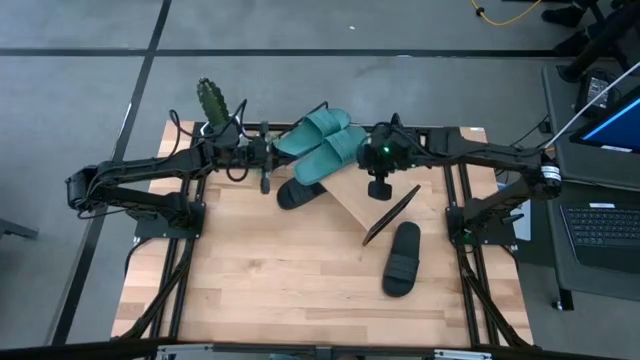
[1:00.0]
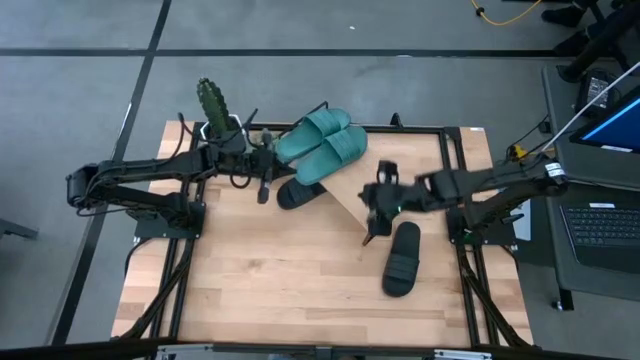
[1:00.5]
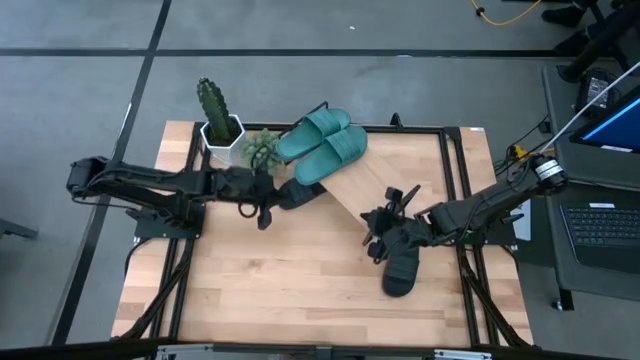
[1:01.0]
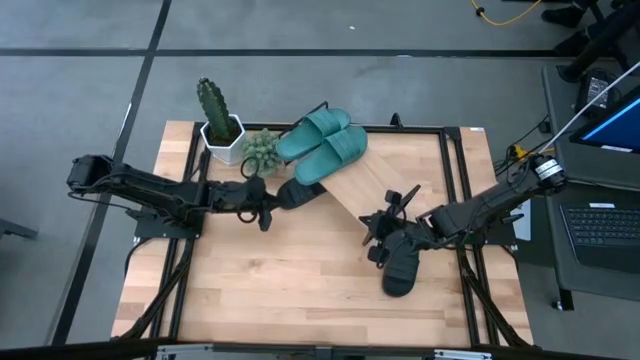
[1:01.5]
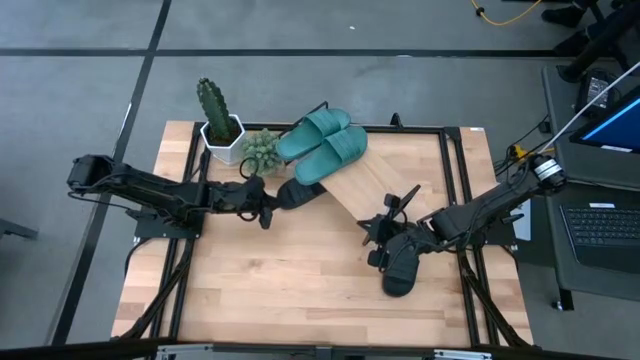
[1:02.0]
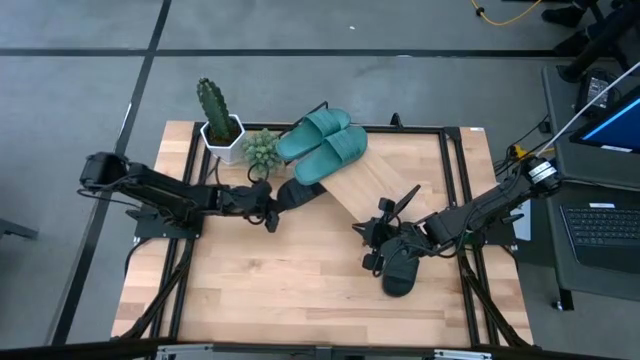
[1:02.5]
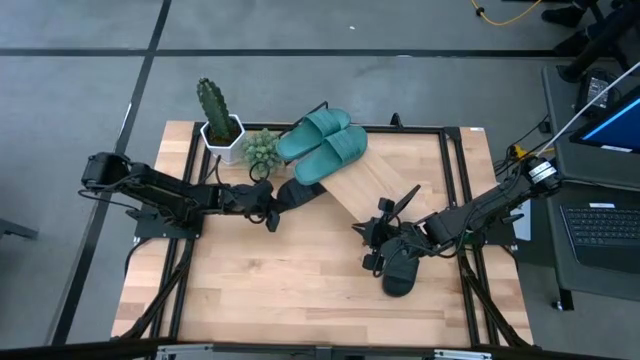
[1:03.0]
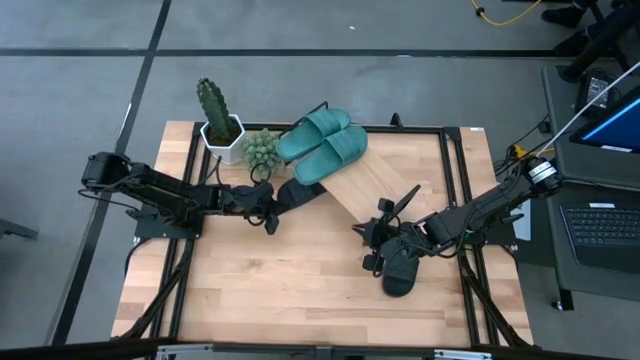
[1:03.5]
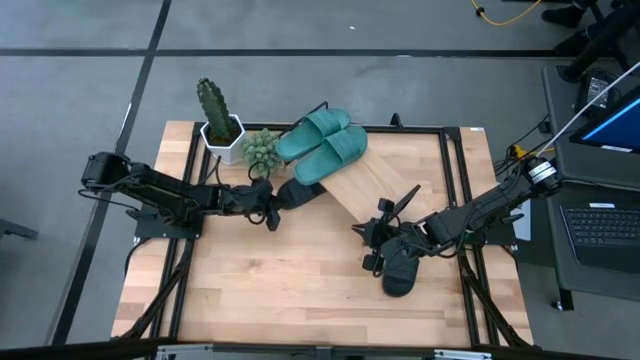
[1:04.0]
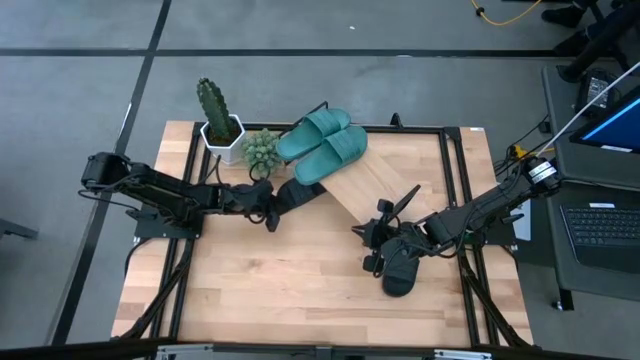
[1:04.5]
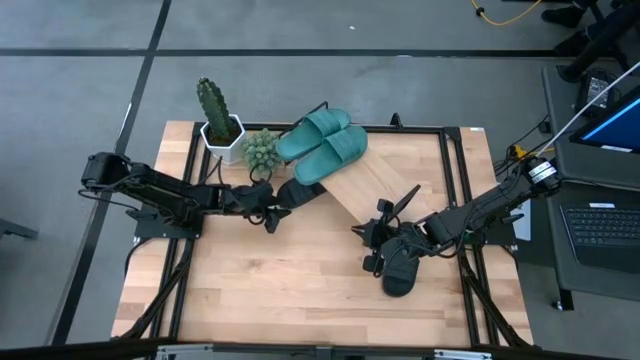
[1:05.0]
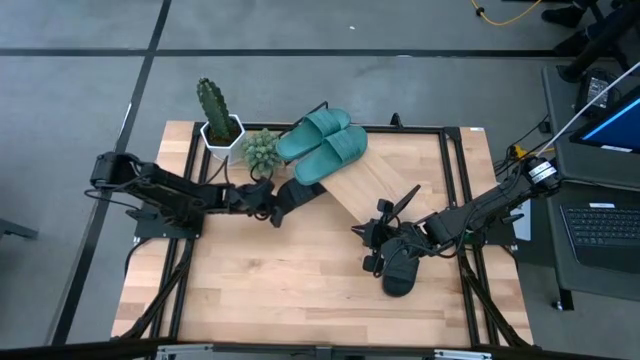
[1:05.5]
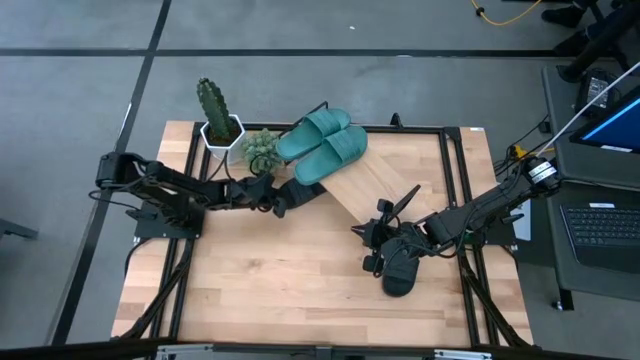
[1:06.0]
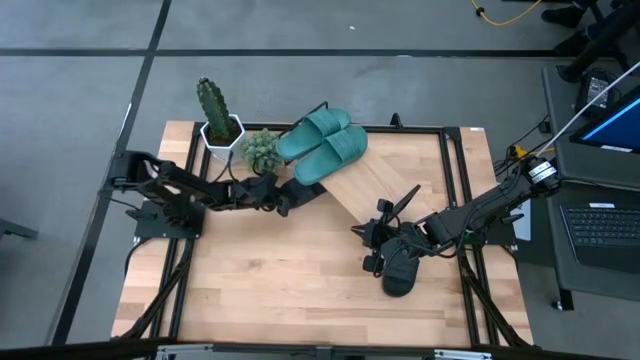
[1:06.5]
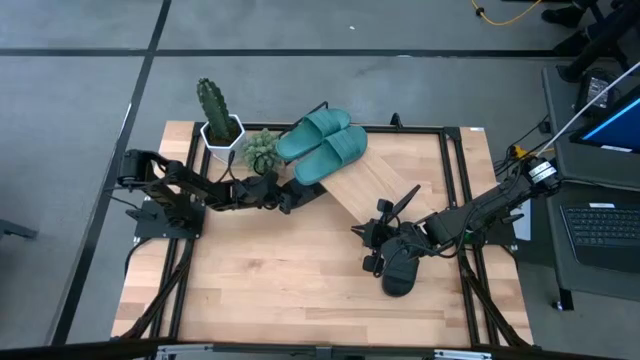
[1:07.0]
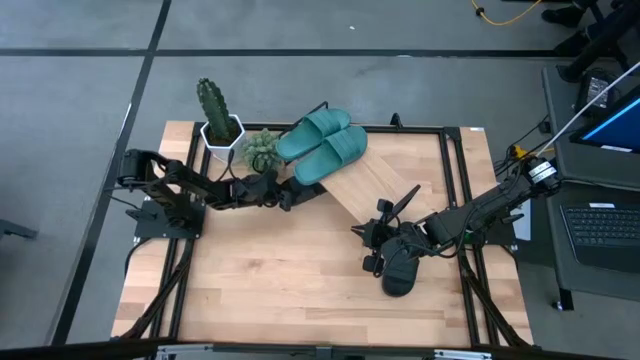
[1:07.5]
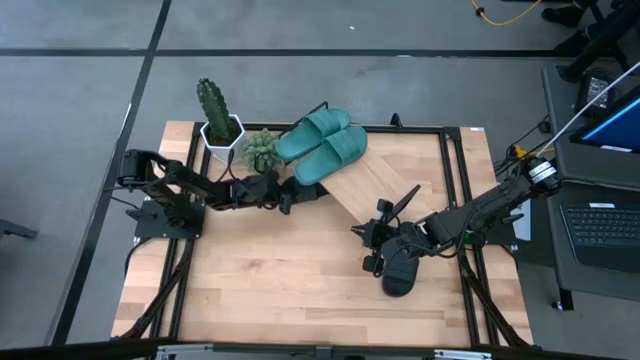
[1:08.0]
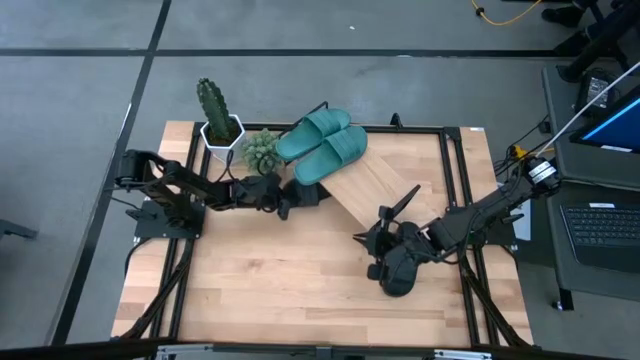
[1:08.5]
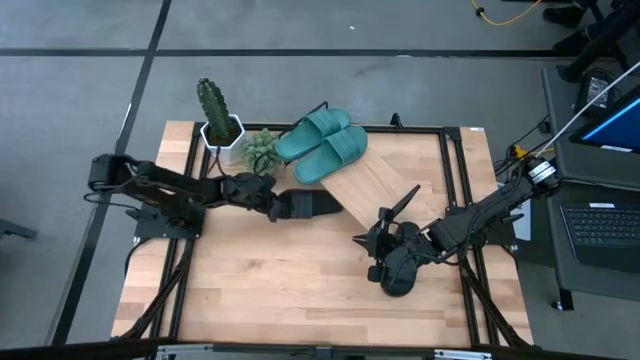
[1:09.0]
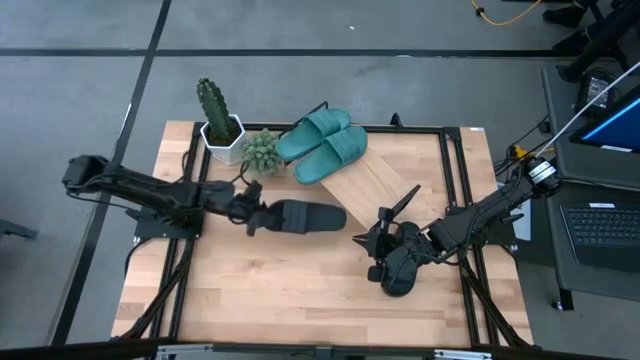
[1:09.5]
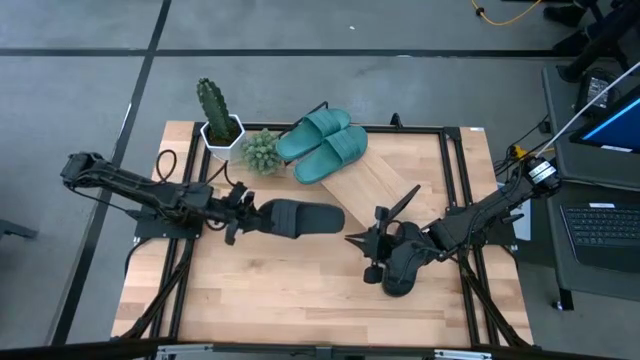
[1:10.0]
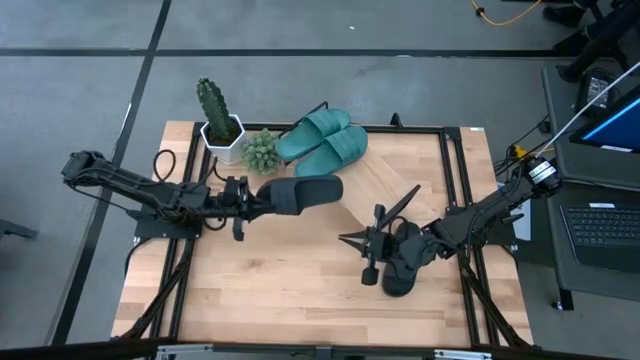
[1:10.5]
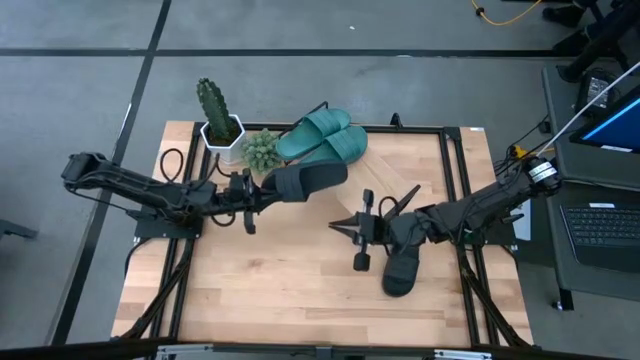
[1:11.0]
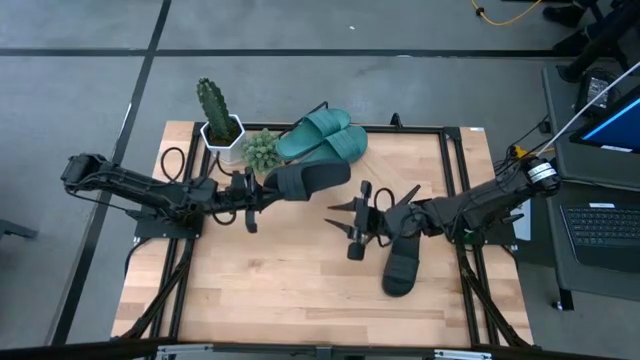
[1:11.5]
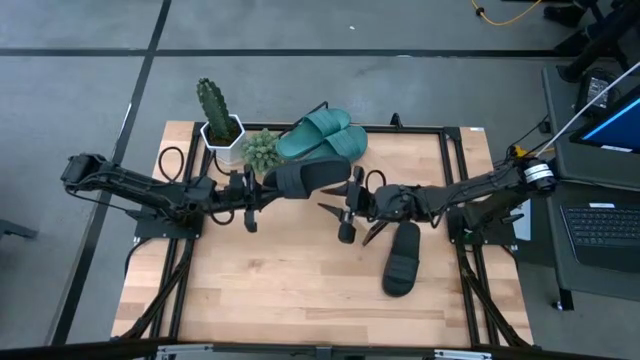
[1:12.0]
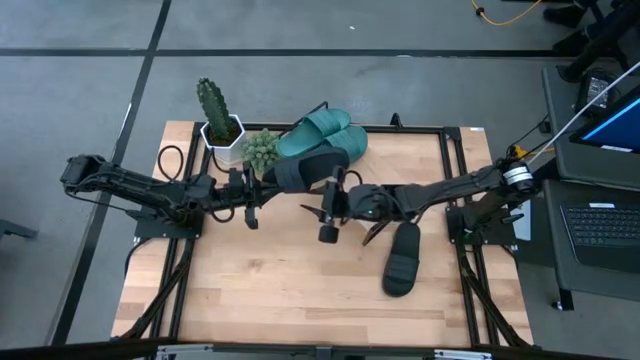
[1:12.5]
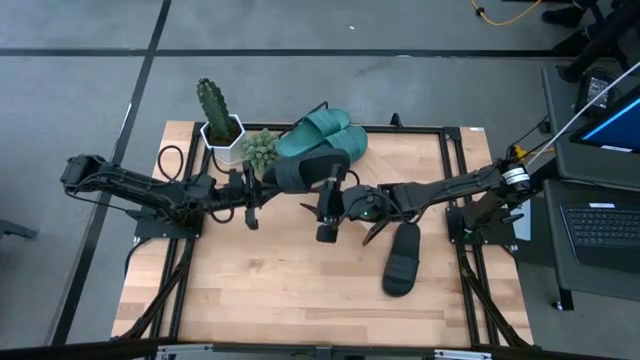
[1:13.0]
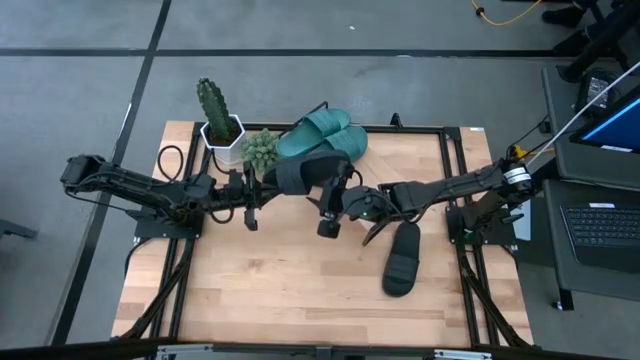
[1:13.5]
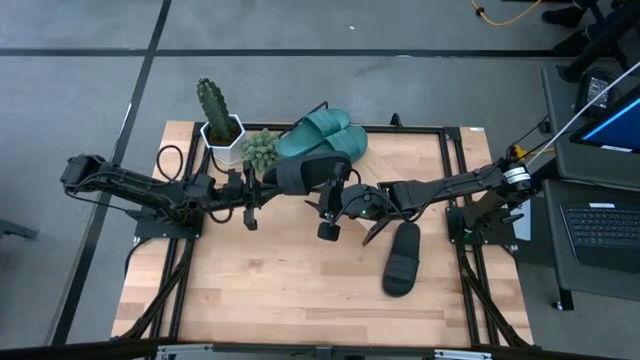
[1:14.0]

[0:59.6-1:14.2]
Task: Pick and place slides into the shelf
Put the top black slides on the shelf

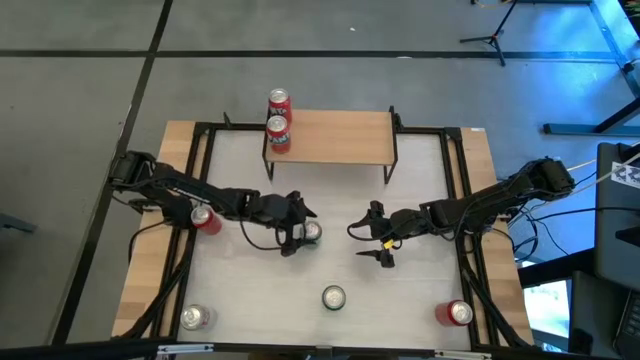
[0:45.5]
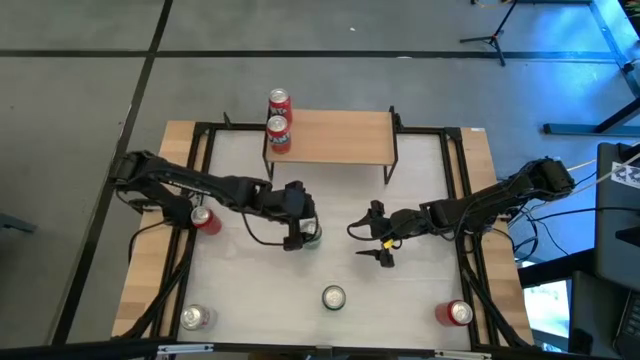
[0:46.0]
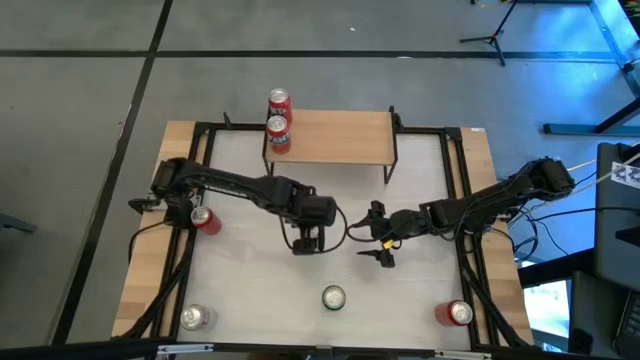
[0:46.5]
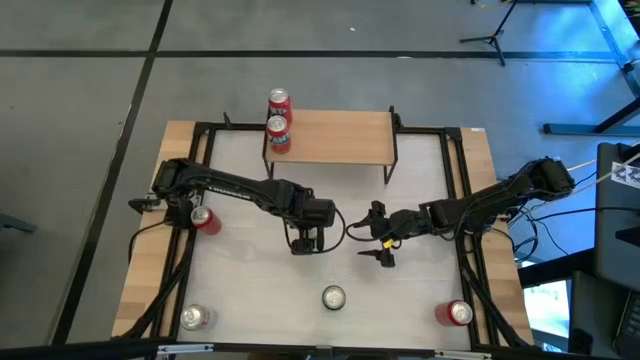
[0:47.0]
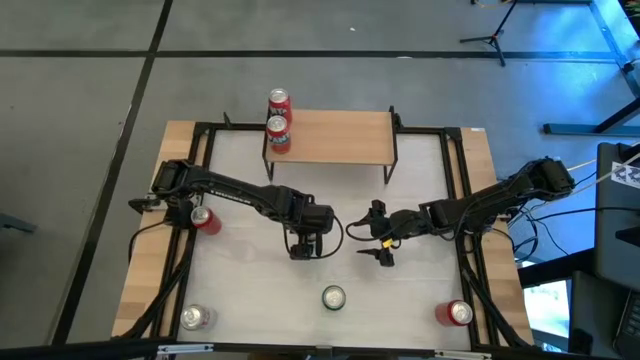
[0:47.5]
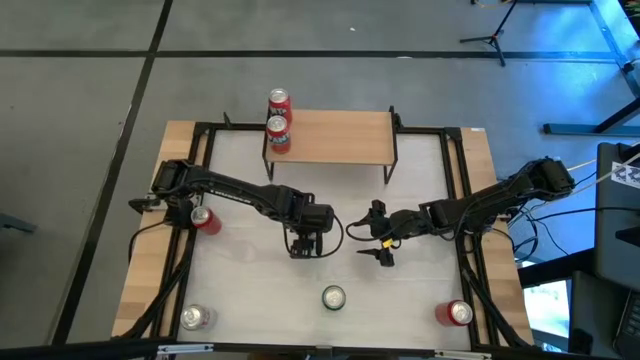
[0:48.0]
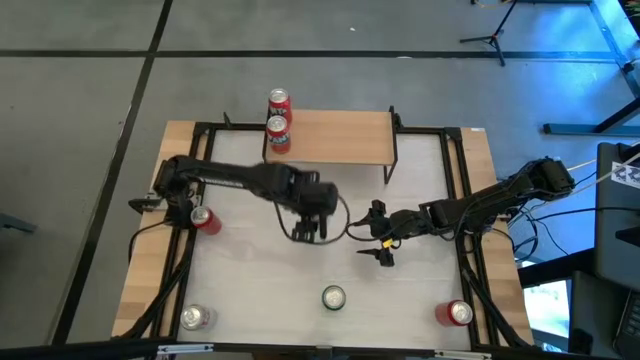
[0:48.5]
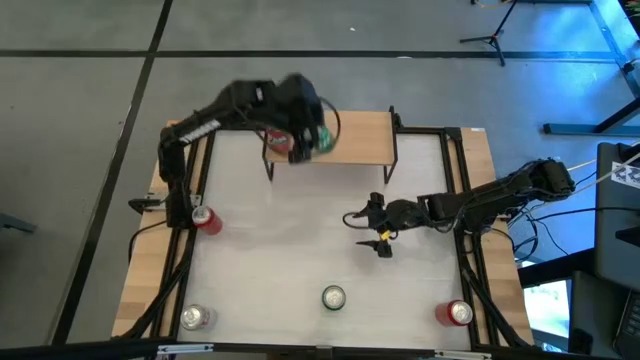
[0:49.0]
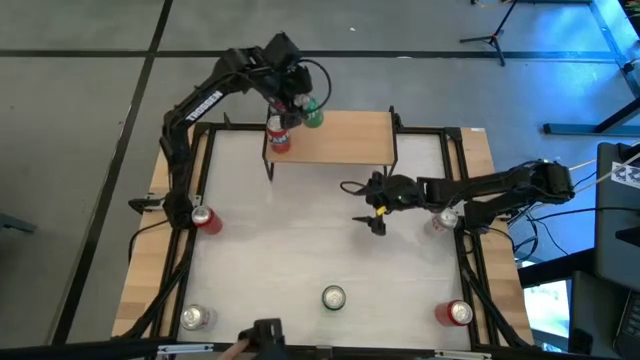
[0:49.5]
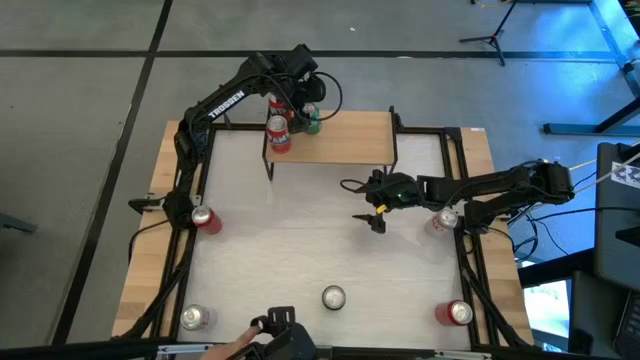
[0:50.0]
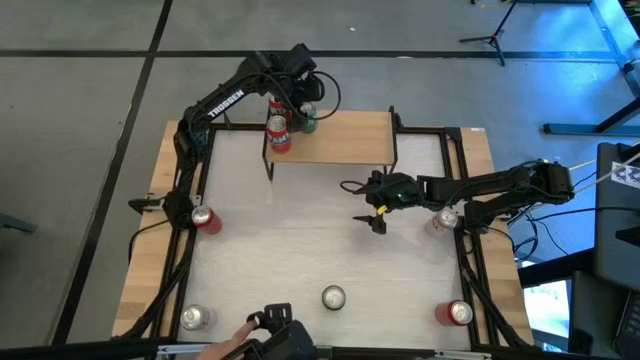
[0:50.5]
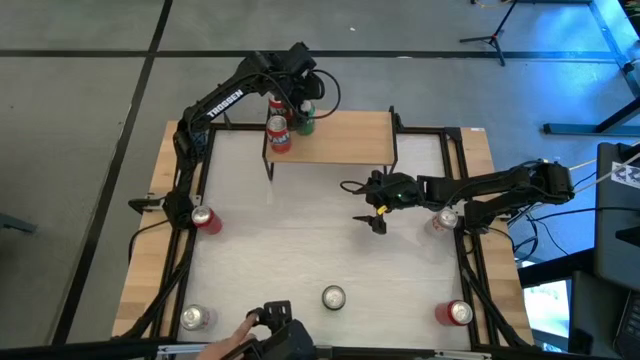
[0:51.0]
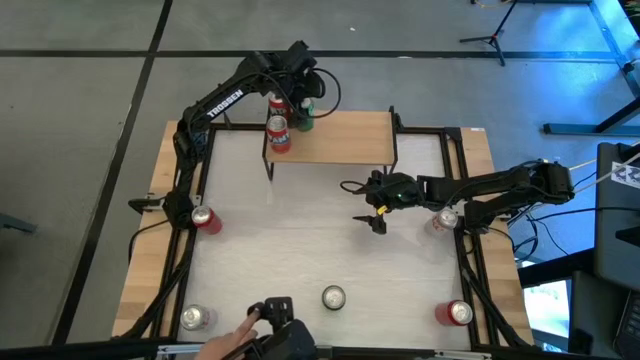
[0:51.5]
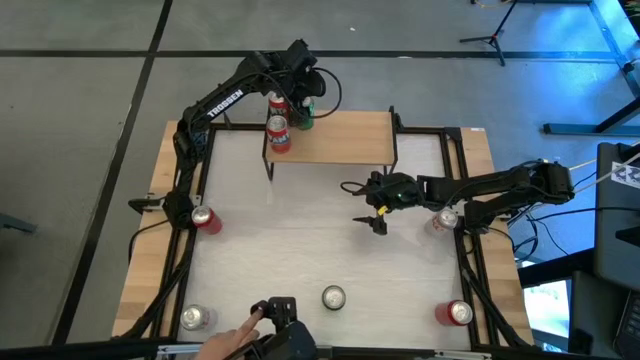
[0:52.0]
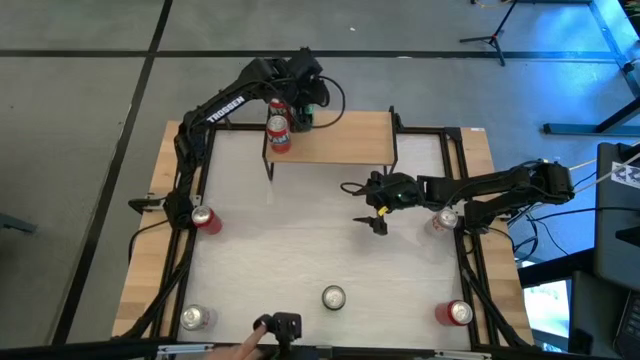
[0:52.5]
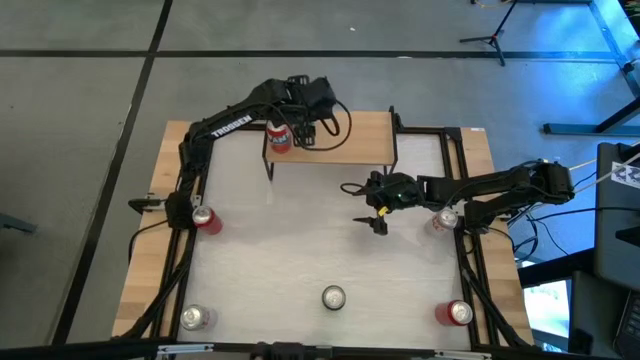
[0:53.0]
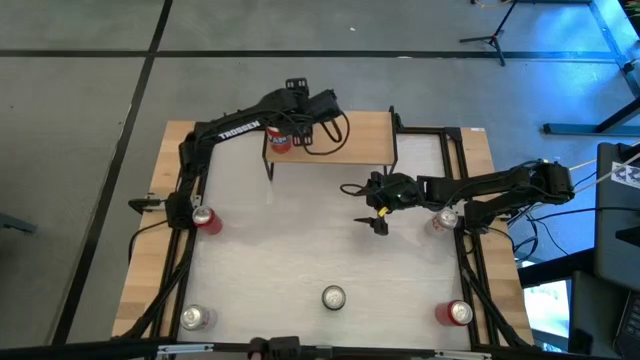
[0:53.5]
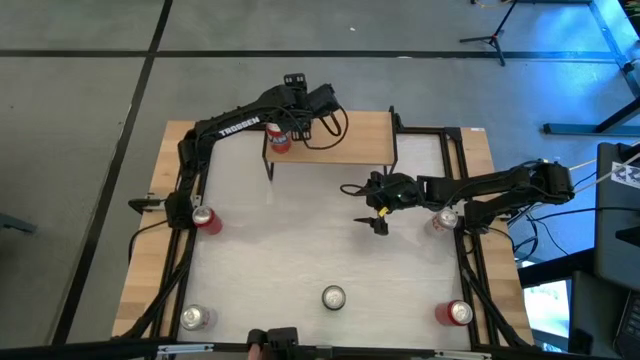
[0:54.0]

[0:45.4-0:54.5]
Task: Place canned beverage on shelf
Put the top green soda can on the shelf
